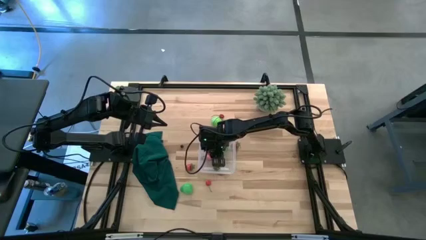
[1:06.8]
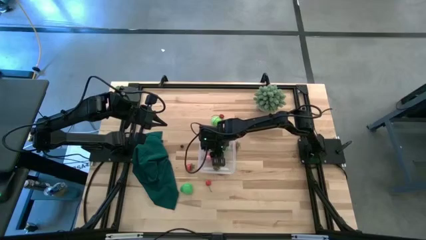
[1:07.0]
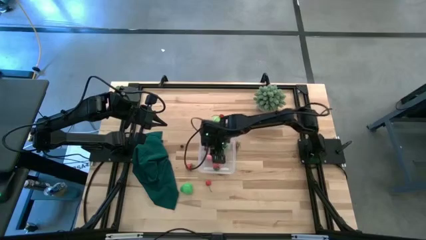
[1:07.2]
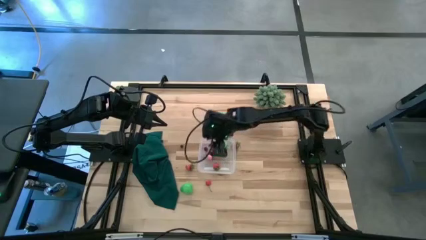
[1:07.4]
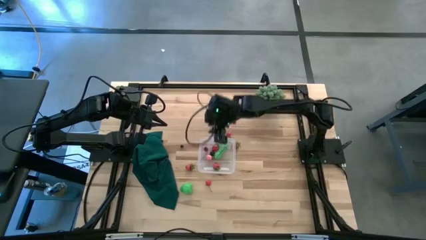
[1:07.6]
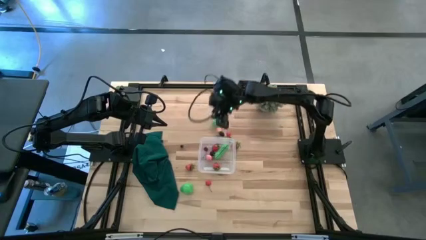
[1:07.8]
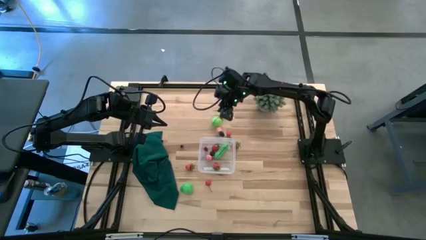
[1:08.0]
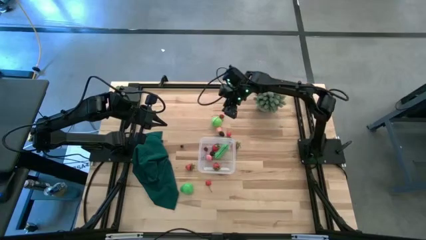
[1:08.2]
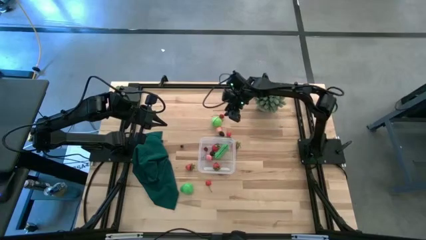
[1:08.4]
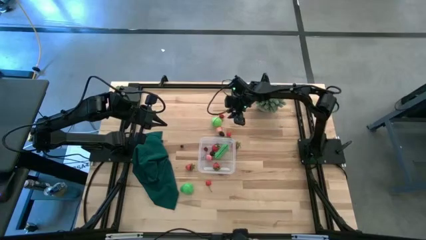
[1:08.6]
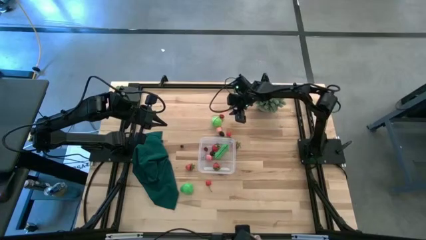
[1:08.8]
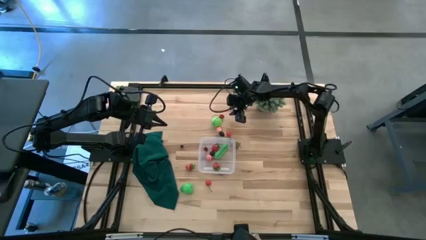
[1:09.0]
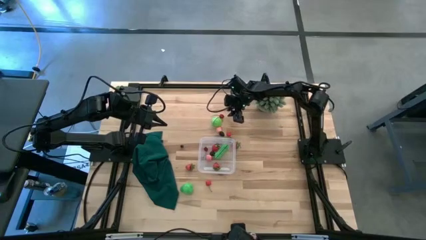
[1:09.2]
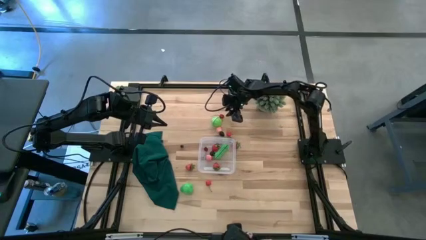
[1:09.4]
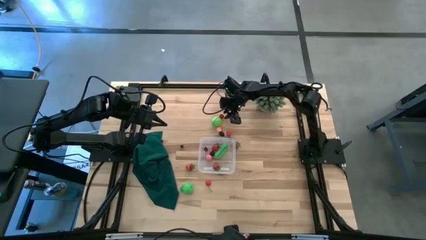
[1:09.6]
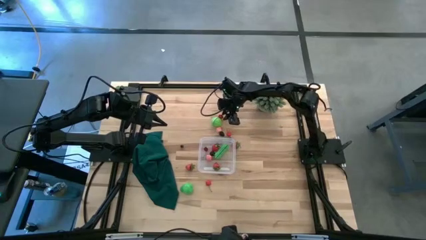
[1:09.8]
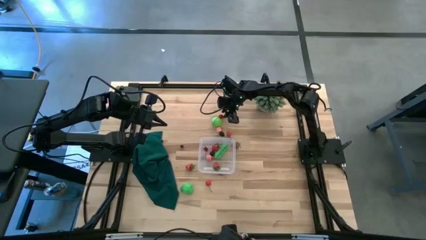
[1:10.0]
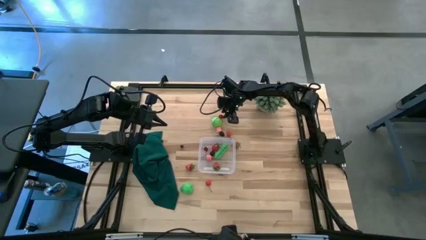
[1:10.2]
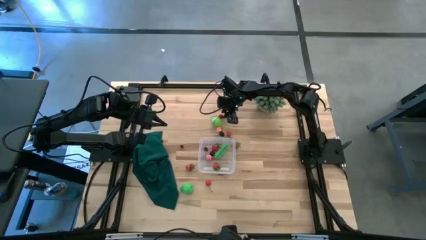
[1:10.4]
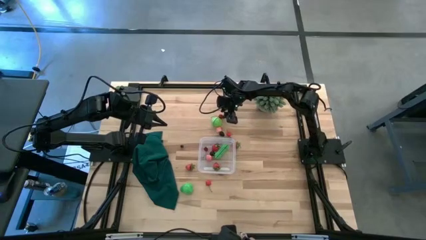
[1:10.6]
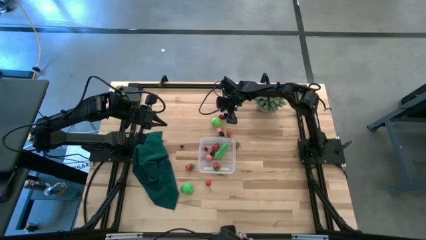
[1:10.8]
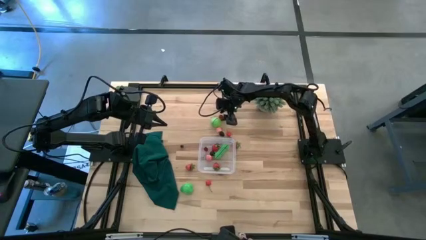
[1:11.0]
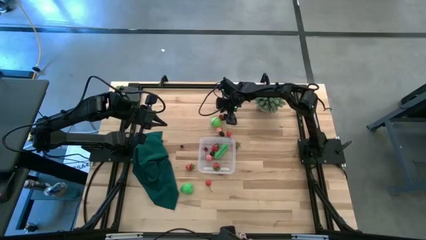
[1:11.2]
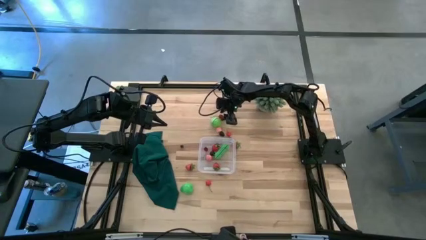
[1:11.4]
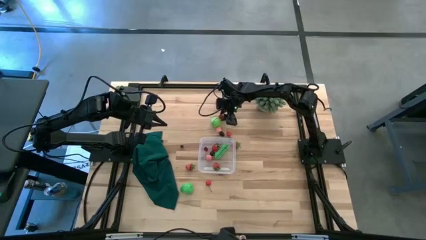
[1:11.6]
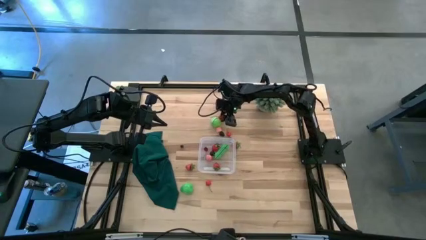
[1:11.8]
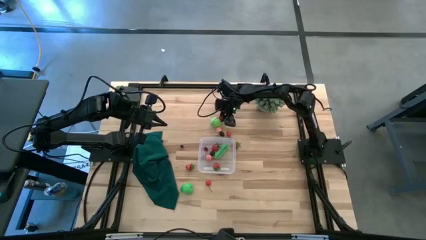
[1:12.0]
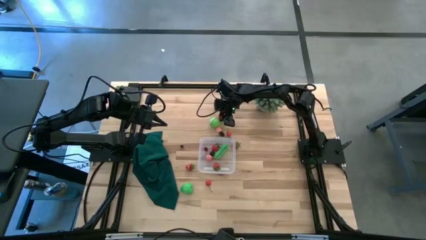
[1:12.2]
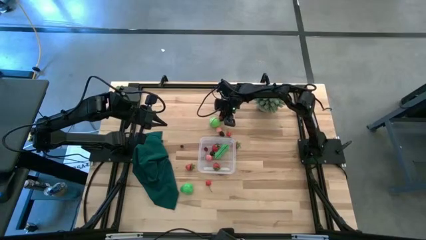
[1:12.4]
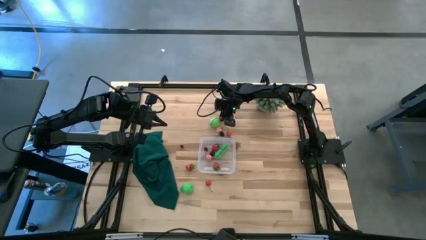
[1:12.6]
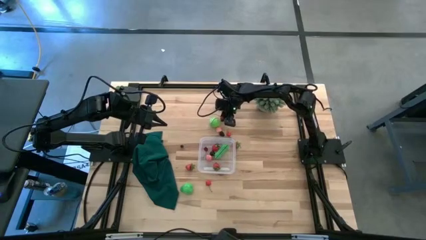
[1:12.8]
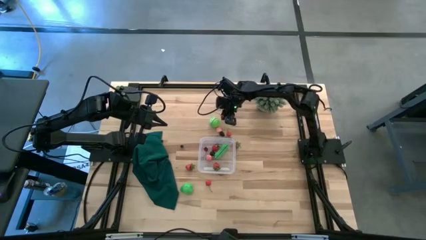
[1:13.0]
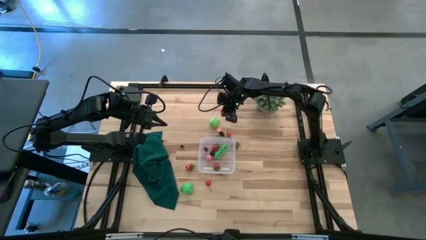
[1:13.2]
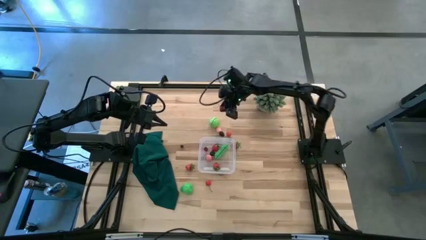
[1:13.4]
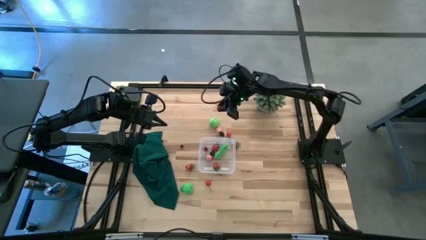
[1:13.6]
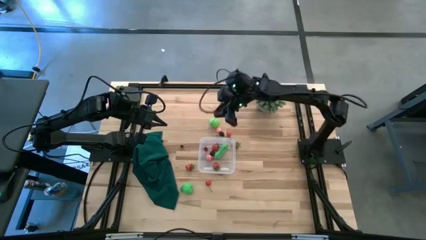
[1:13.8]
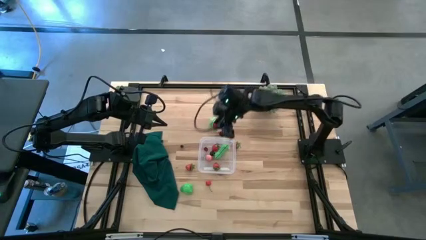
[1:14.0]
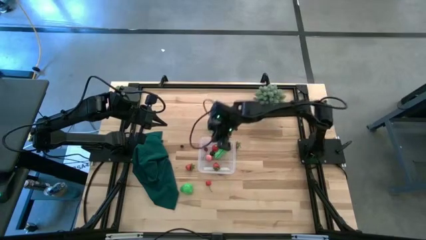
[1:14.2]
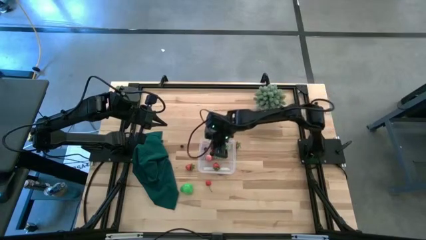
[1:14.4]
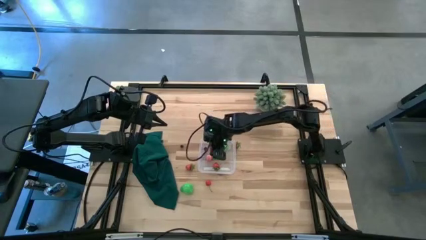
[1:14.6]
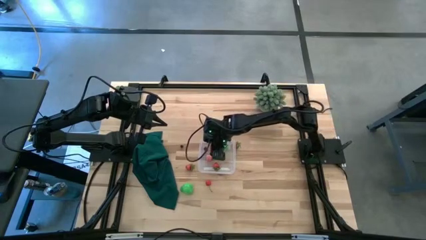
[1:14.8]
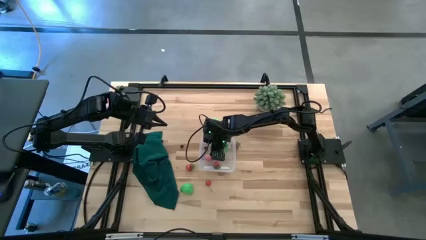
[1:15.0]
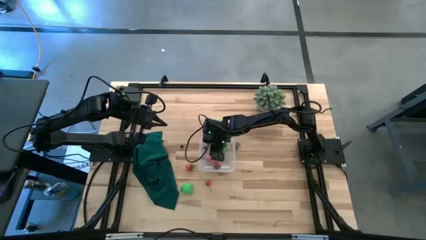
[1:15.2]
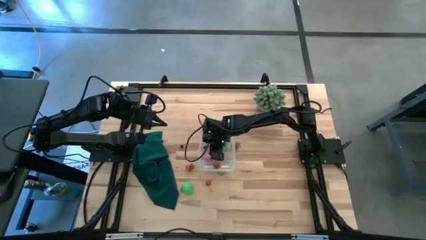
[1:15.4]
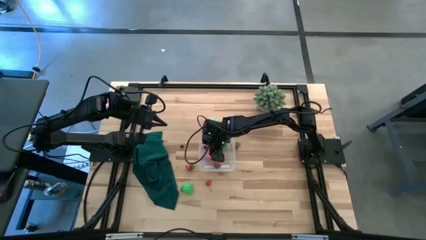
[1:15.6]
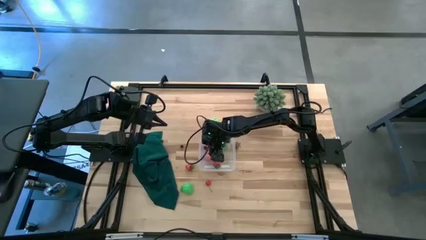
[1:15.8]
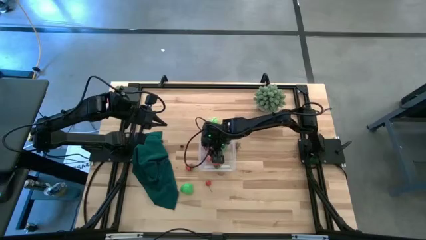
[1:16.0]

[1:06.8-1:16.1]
Task: Pick and placing Produce into tupperware
Put the red cherry into the transparent bin

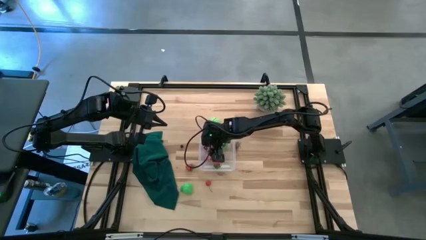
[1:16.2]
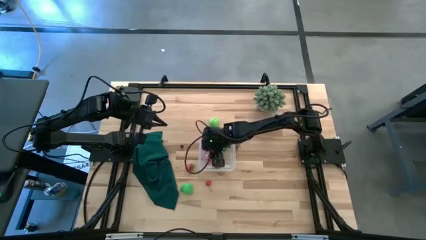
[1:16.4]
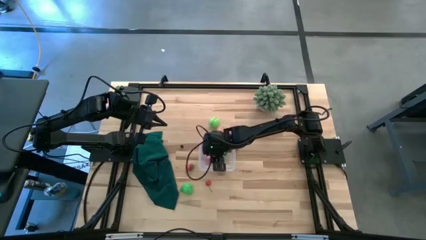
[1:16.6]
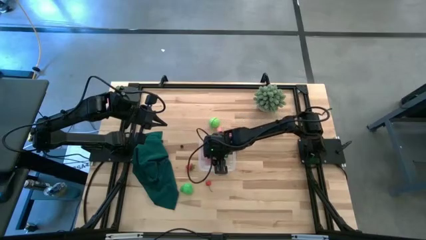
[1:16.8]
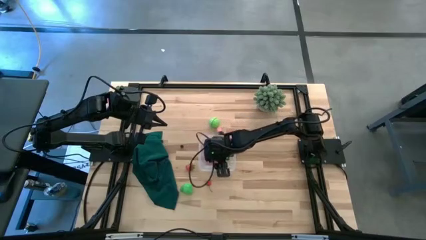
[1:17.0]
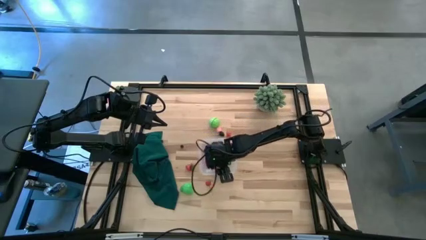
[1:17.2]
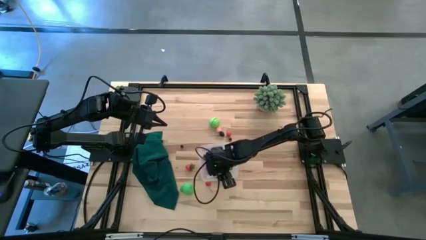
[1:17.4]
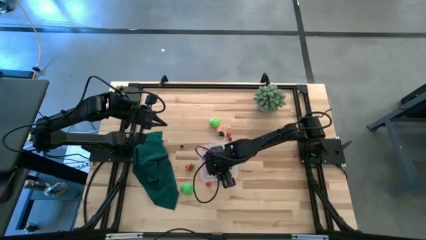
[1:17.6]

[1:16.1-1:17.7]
Adjust the transparent bin on the table

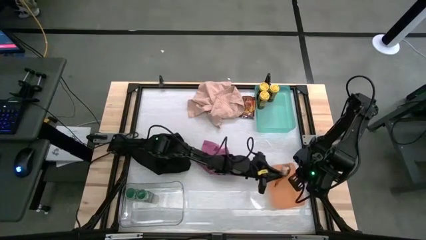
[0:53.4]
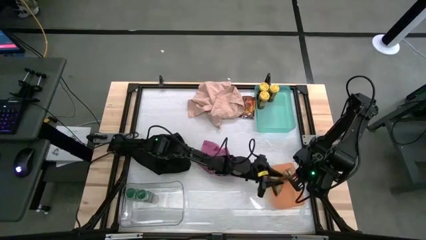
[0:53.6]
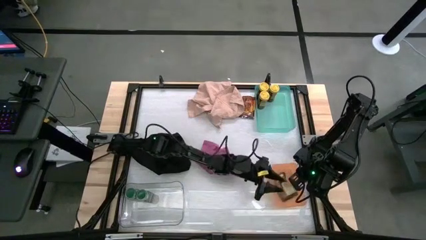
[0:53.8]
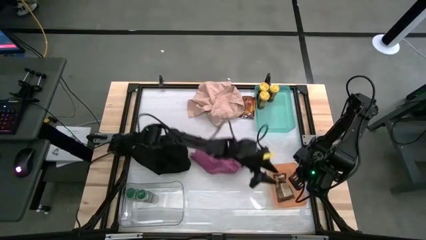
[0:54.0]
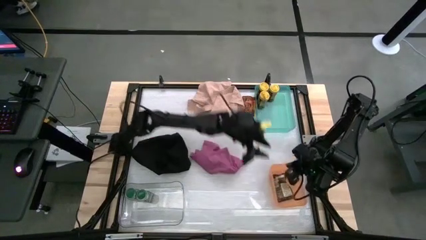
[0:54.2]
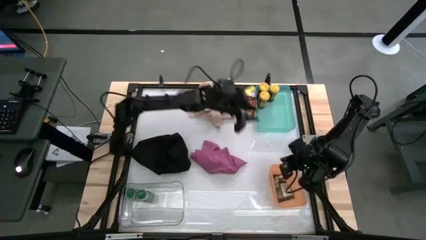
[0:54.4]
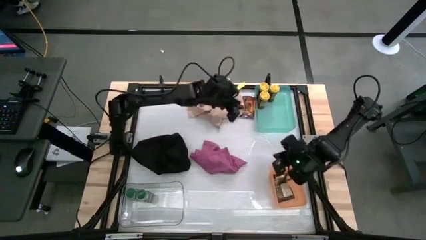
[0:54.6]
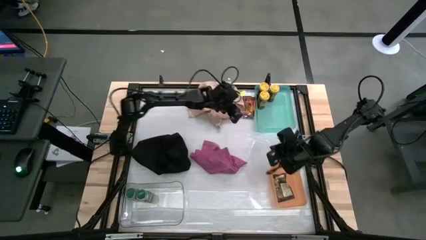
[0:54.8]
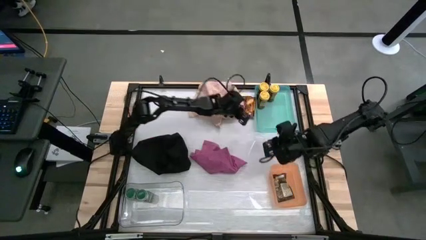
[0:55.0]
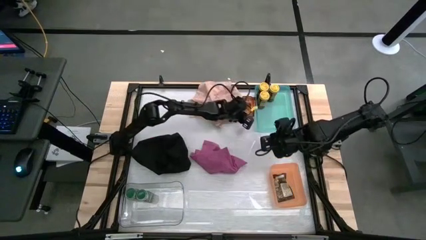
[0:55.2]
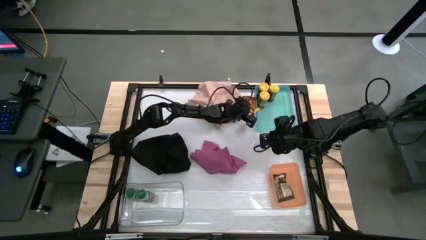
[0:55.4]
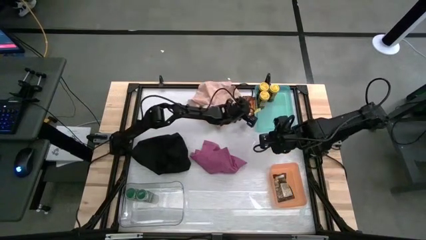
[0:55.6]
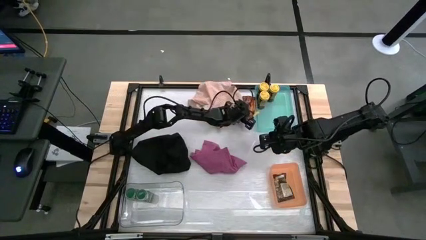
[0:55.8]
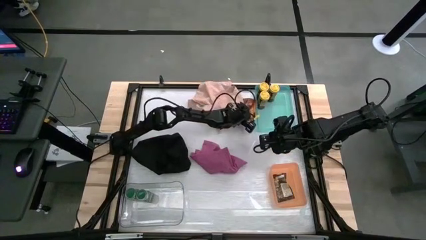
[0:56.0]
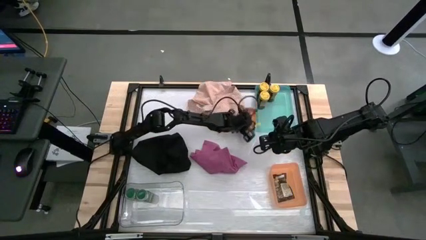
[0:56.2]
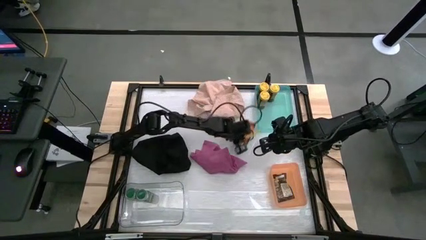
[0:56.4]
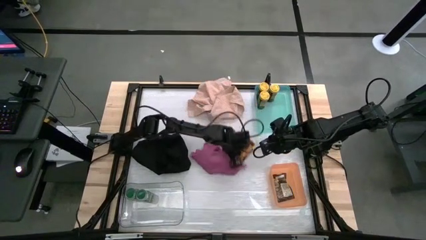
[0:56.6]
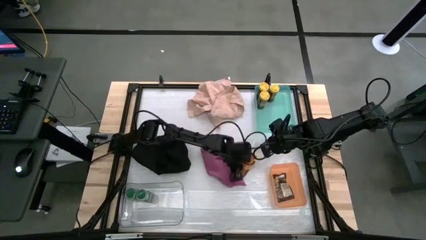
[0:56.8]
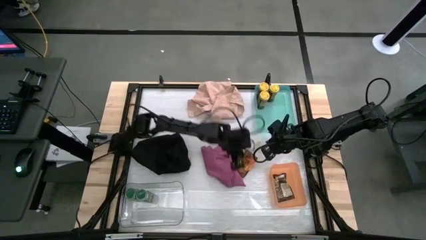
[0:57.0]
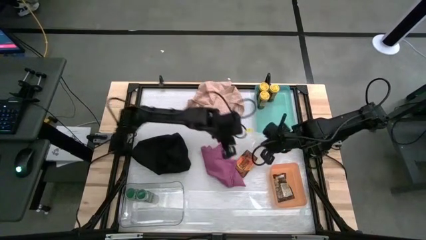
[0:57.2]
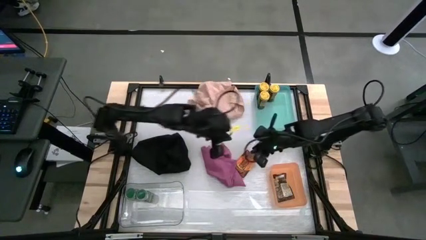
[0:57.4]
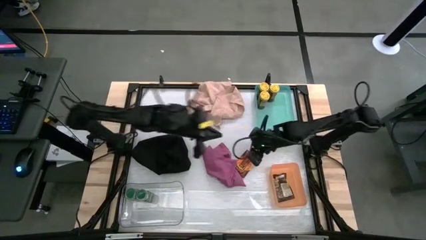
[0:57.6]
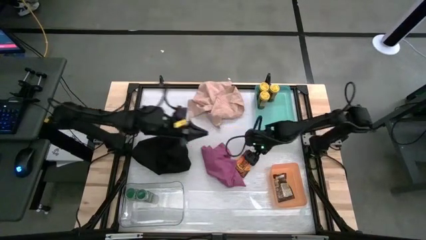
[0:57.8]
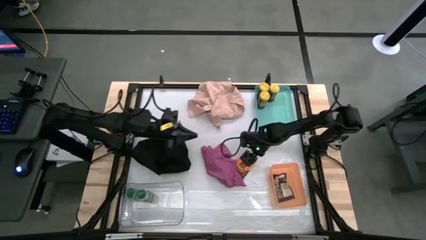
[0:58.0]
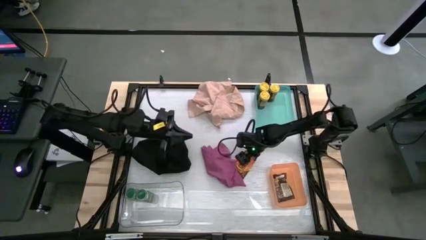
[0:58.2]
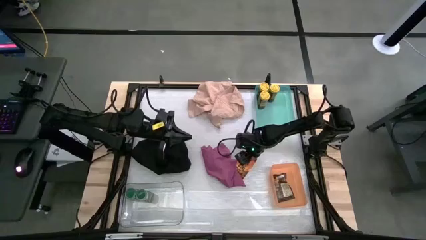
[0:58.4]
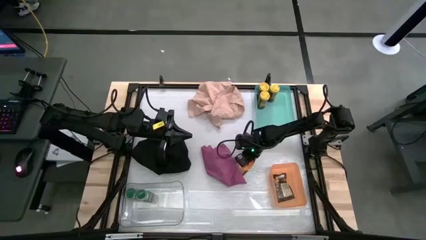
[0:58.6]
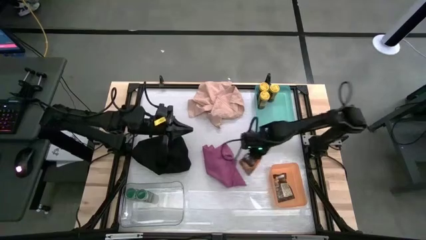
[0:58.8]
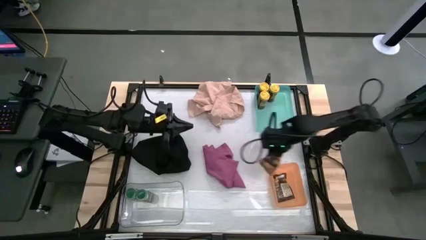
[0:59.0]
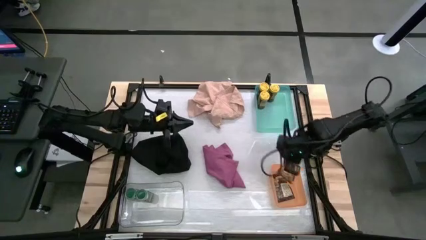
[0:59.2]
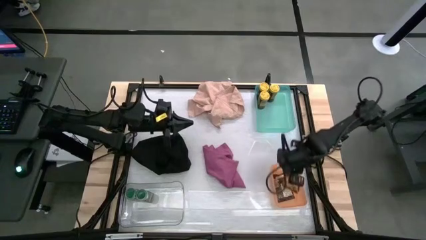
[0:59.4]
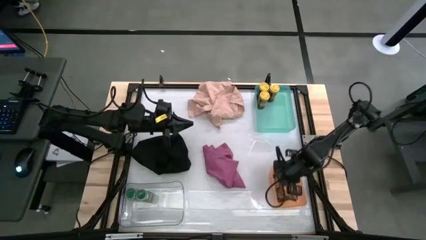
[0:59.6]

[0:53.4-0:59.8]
Task: Sort spices by type
Put the orange seasoning bag into the orange bin
